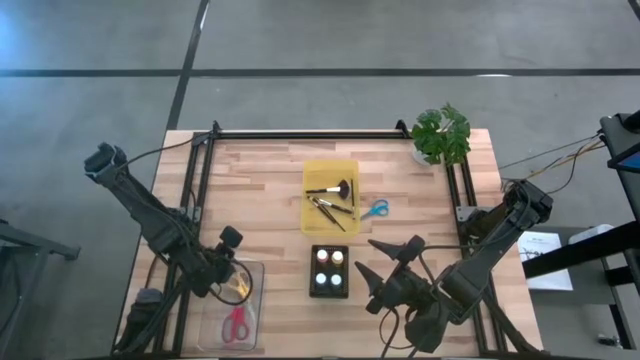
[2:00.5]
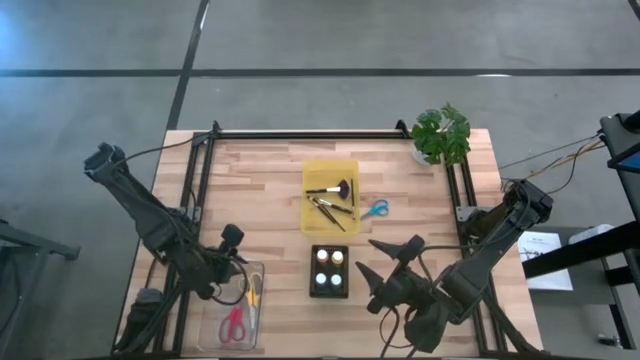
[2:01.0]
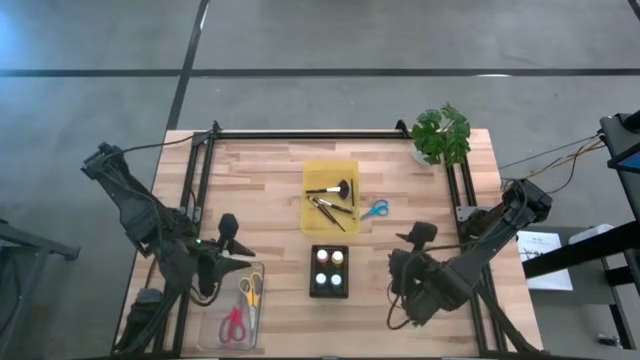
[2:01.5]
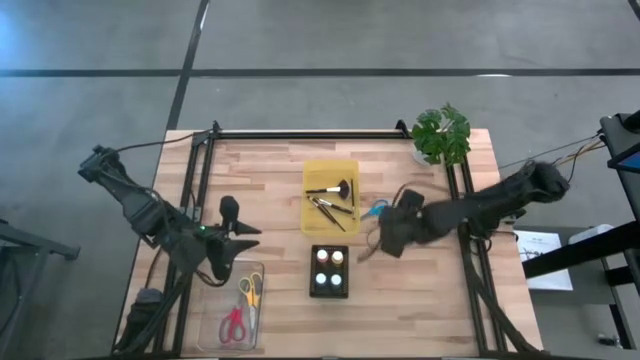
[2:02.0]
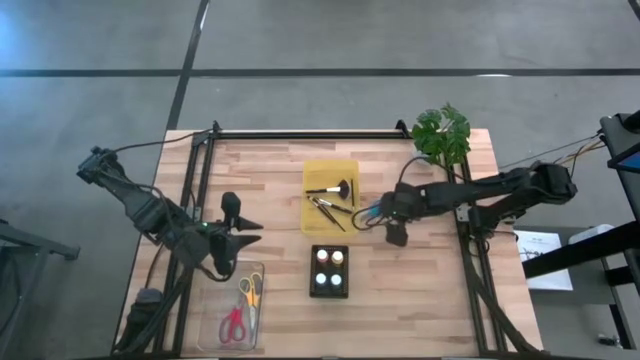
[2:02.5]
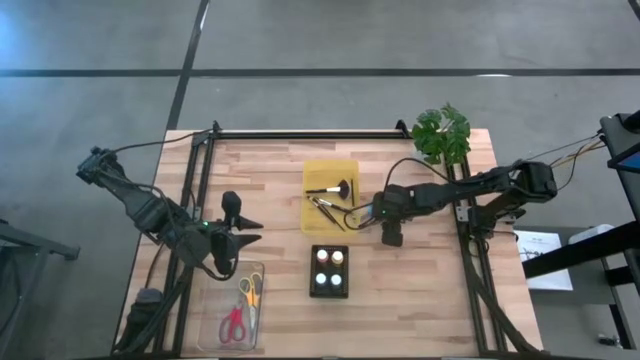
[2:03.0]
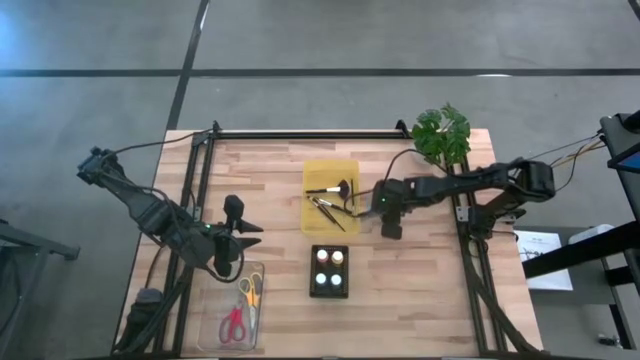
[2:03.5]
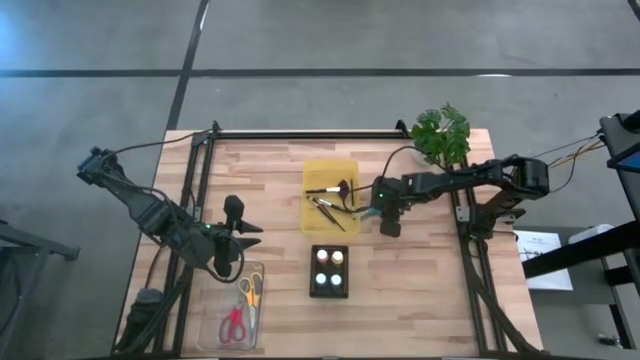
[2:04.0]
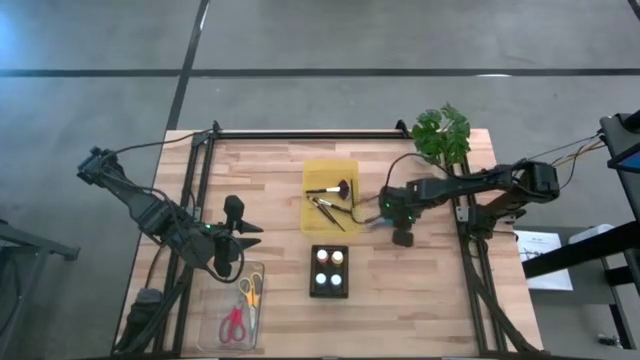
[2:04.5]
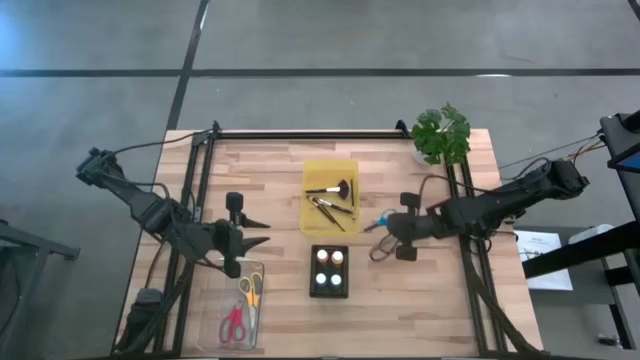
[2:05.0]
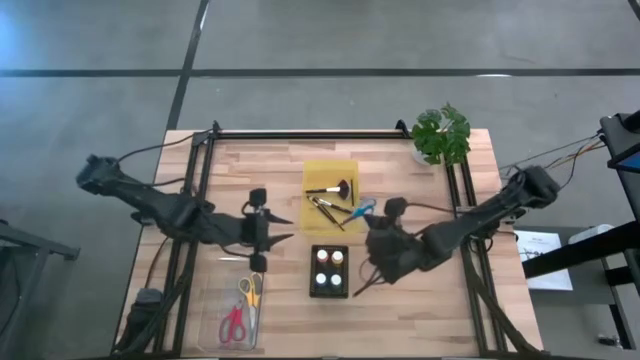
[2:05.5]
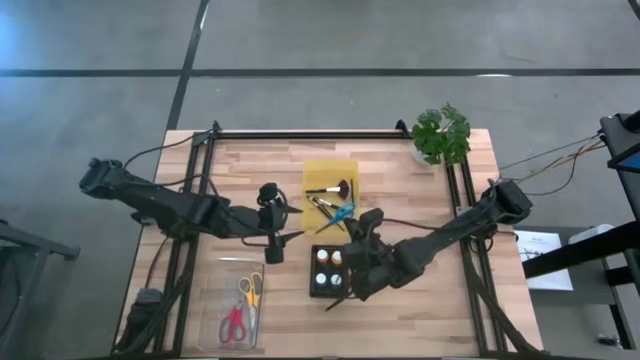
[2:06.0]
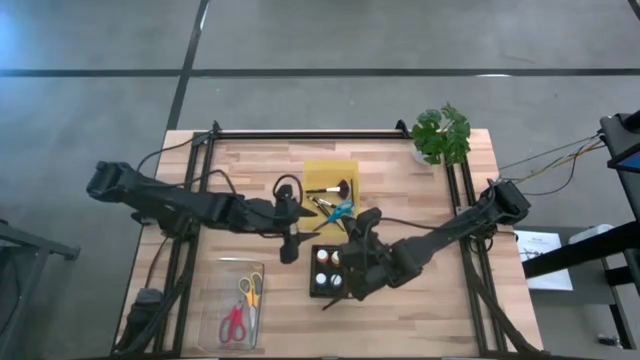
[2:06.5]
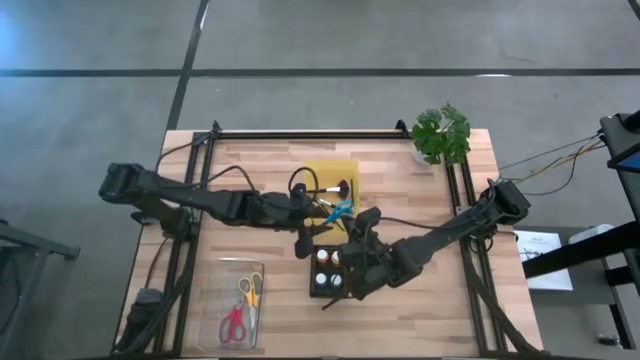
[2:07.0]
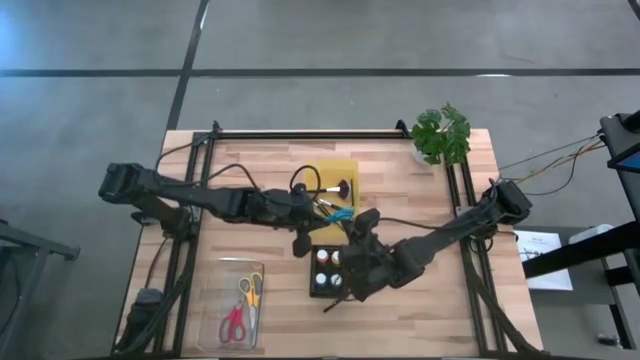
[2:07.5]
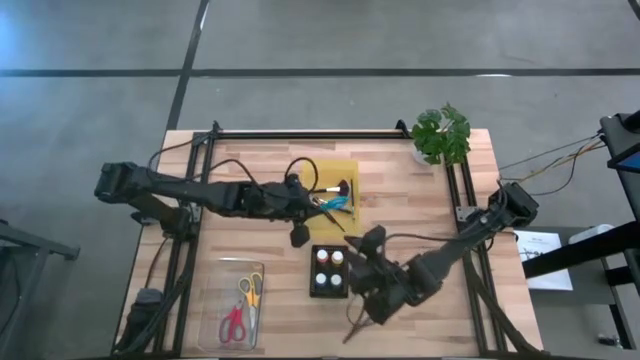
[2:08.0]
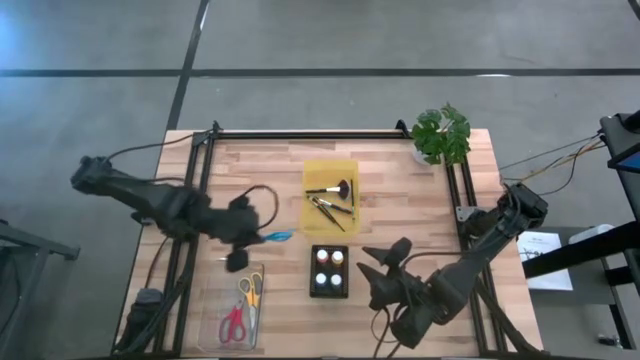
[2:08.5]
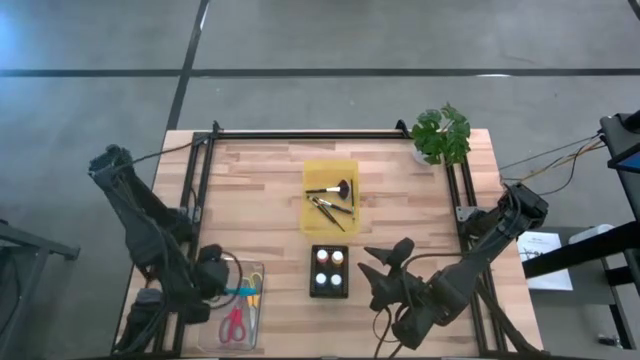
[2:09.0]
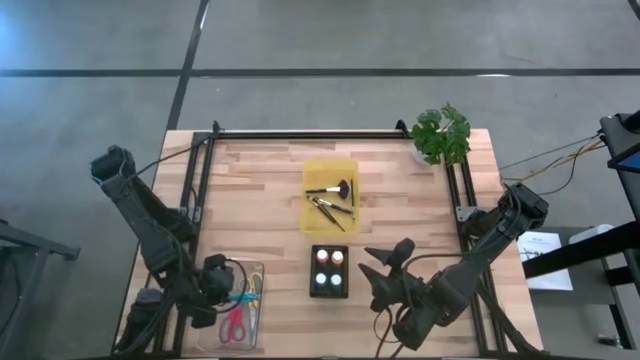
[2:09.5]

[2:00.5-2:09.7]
Task: Pick & Place Paint Supplies
Put the blue scissors into the transparent bin

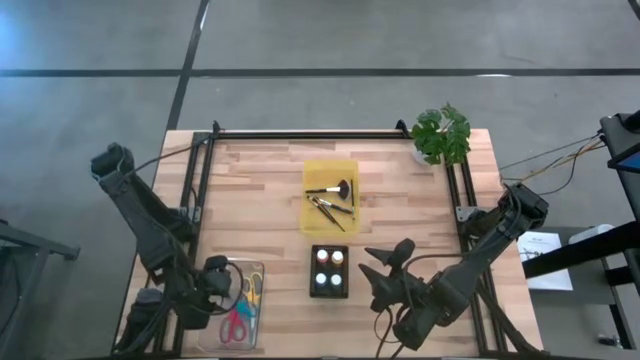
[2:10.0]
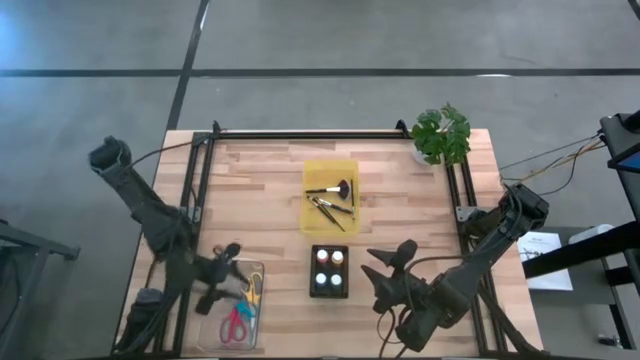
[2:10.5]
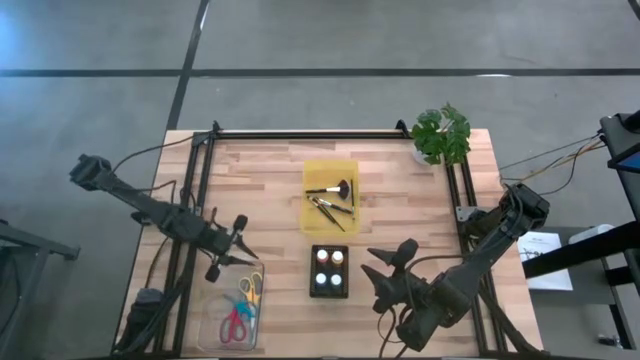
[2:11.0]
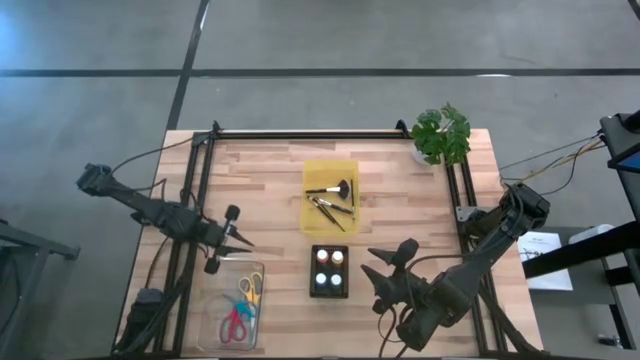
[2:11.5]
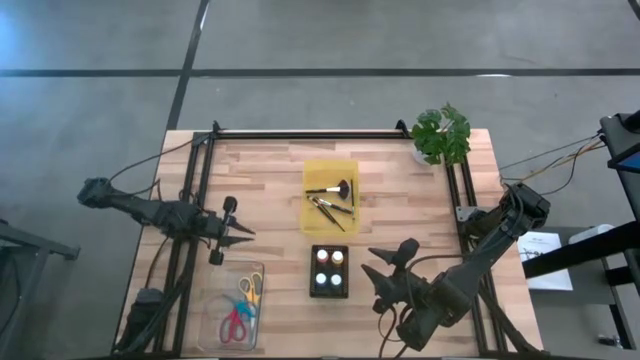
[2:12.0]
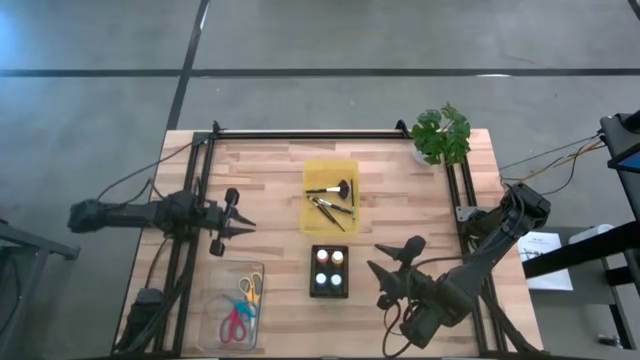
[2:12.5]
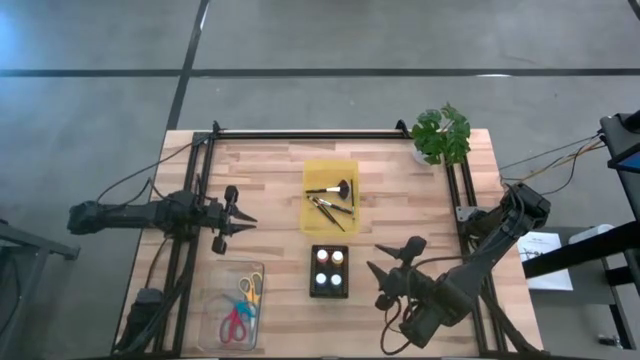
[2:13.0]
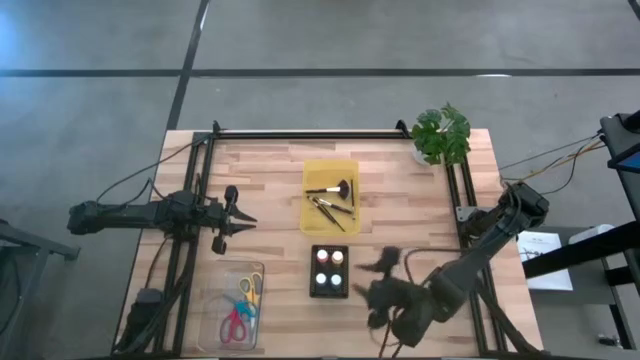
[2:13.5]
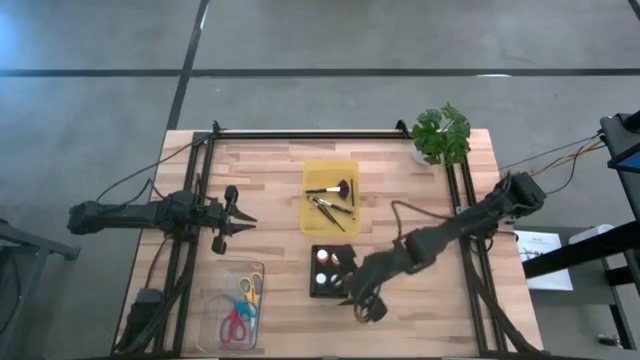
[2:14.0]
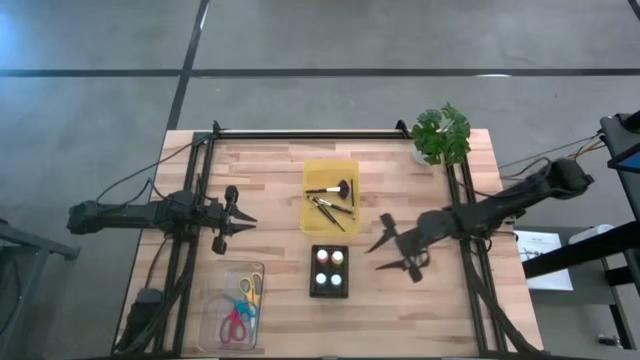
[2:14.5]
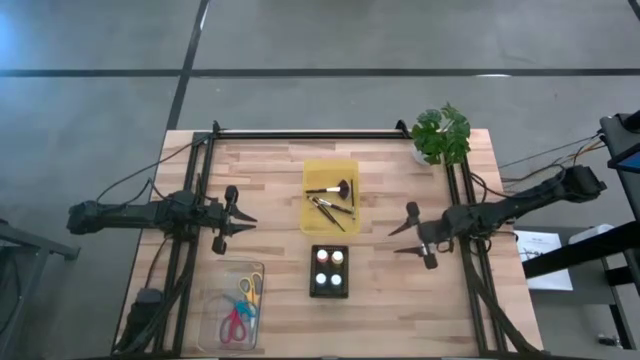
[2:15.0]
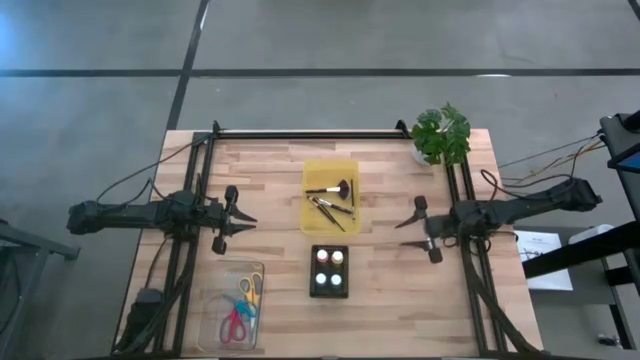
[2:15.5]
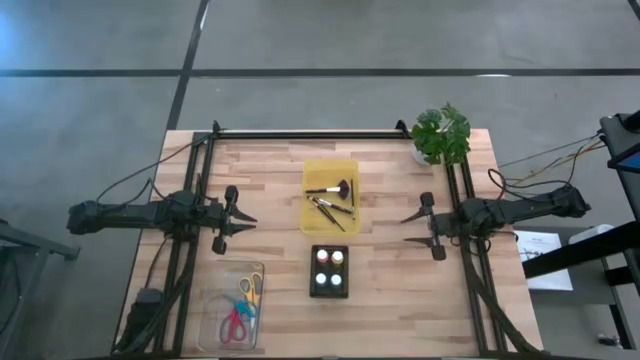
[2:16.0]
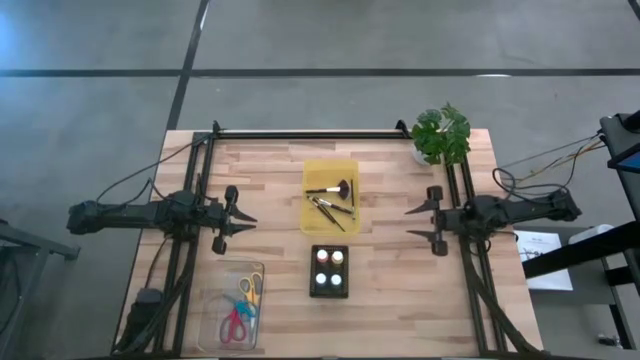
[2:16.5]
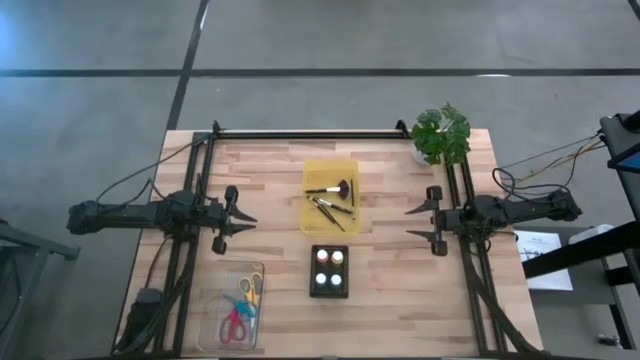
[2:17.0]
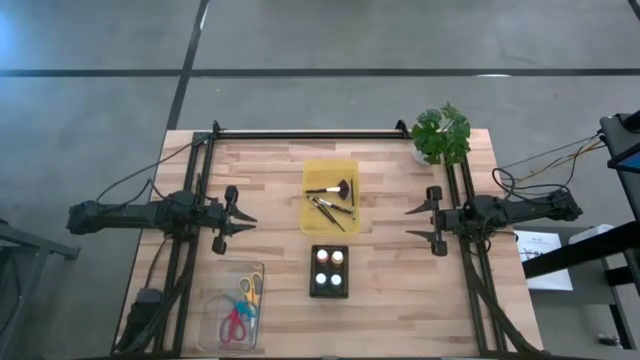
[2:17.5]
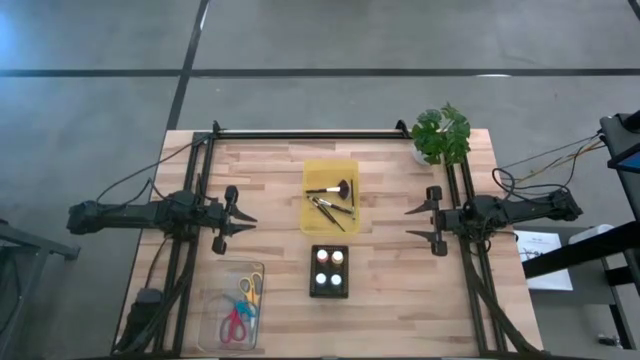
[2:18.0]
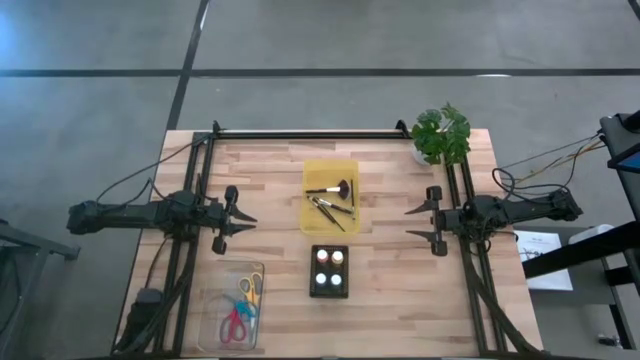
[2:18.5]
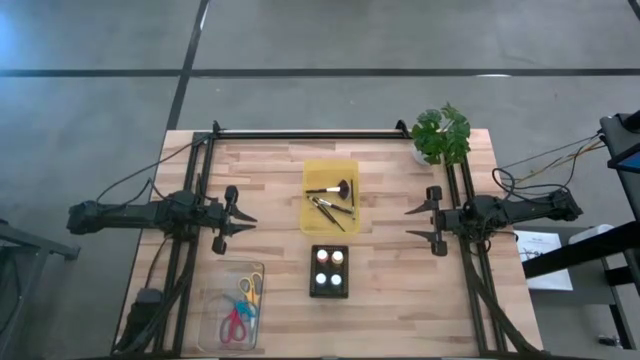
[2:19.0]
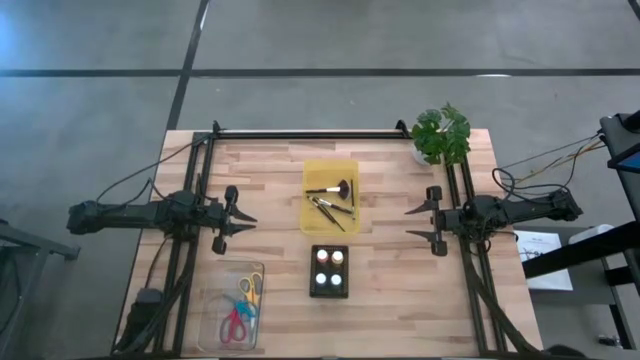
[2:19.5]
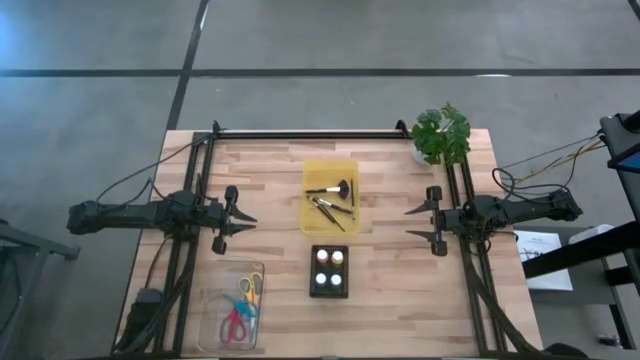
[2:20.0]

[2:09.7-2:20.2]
Return to Home Position
